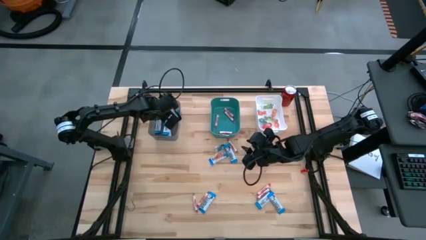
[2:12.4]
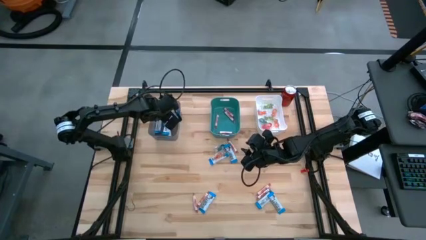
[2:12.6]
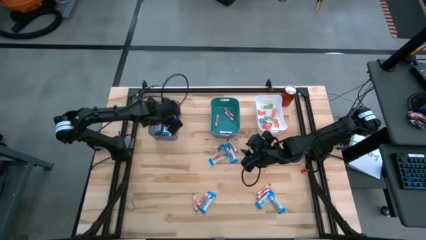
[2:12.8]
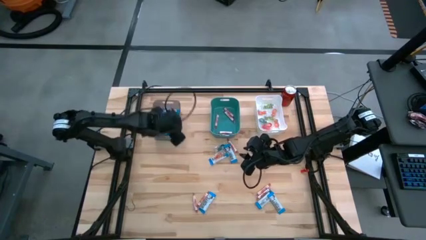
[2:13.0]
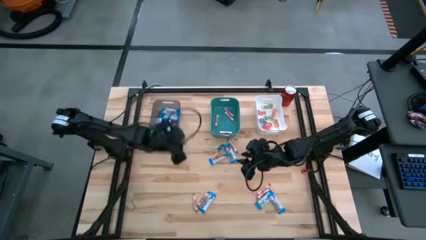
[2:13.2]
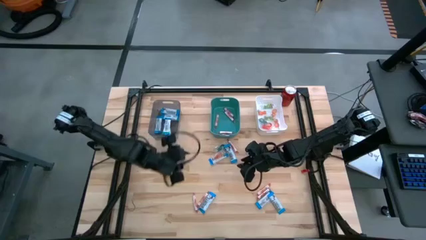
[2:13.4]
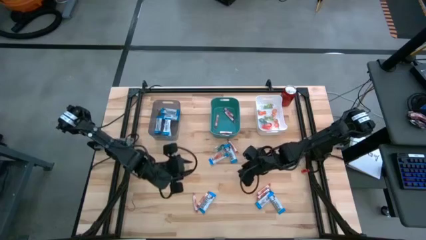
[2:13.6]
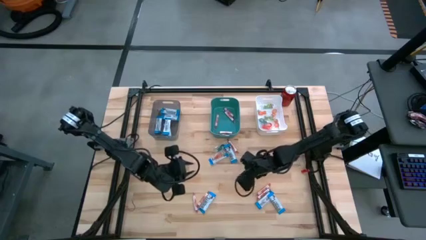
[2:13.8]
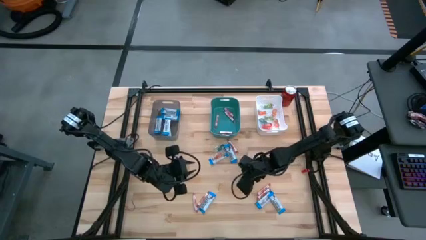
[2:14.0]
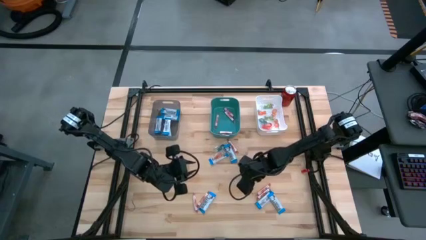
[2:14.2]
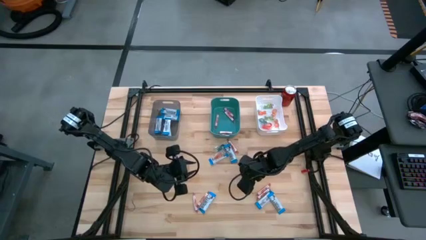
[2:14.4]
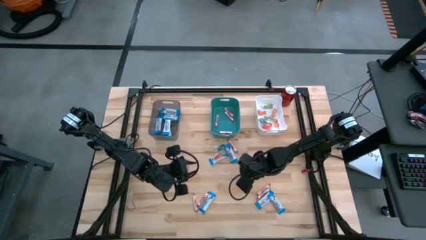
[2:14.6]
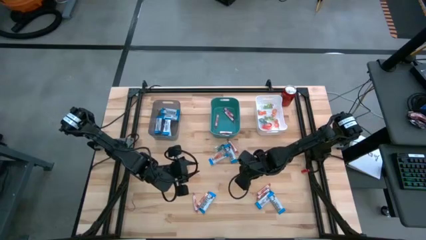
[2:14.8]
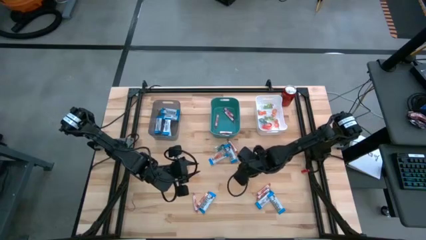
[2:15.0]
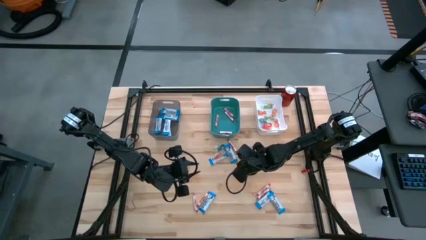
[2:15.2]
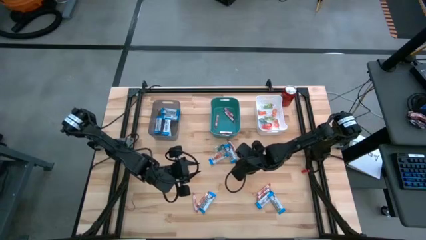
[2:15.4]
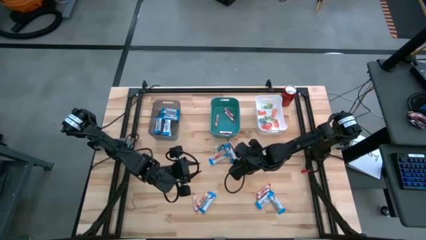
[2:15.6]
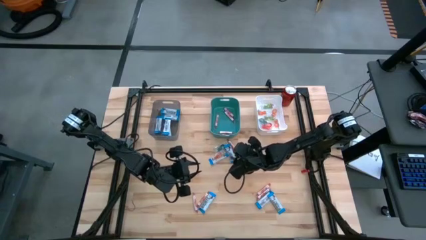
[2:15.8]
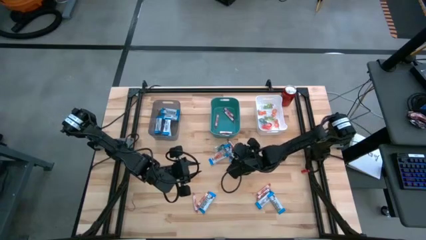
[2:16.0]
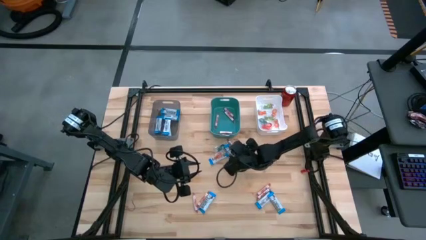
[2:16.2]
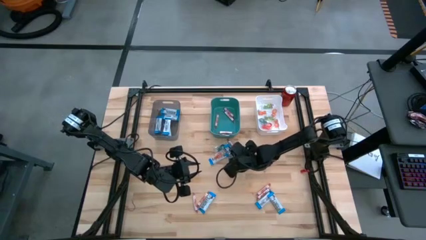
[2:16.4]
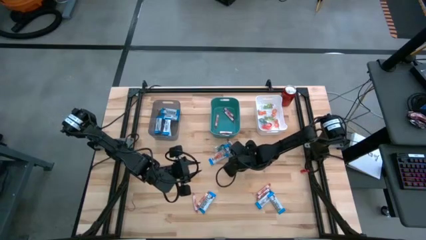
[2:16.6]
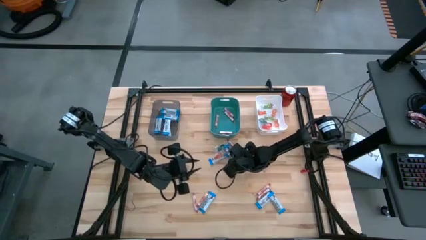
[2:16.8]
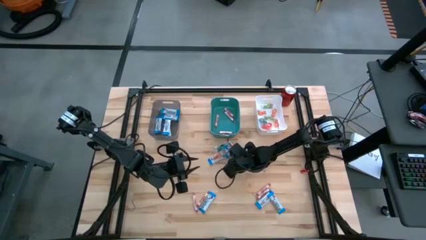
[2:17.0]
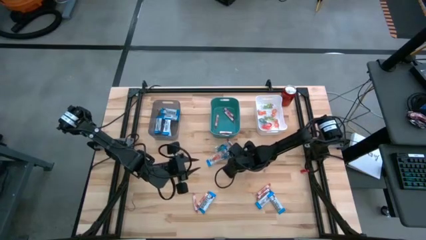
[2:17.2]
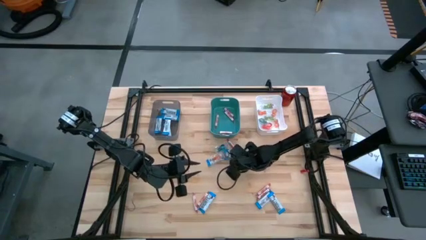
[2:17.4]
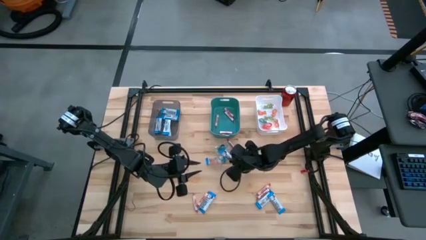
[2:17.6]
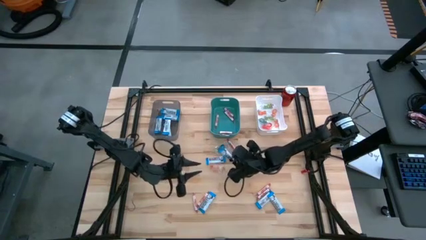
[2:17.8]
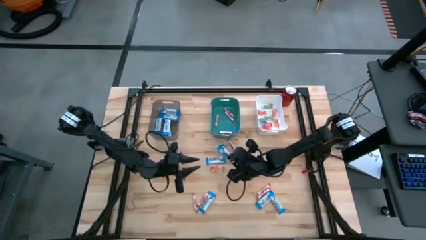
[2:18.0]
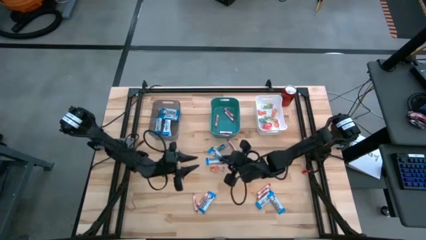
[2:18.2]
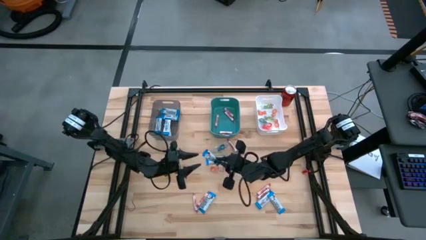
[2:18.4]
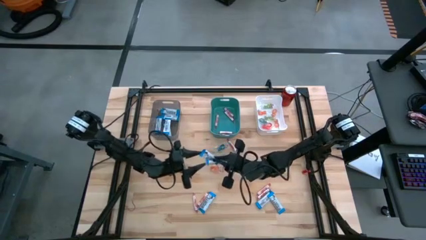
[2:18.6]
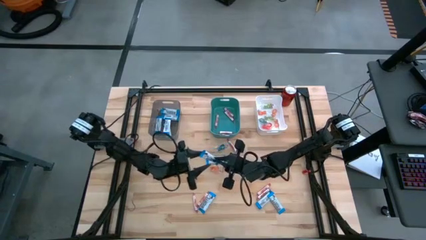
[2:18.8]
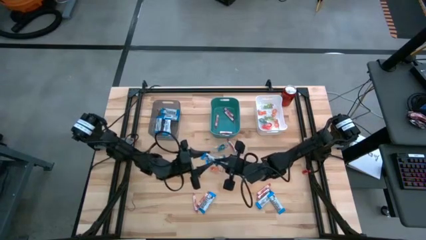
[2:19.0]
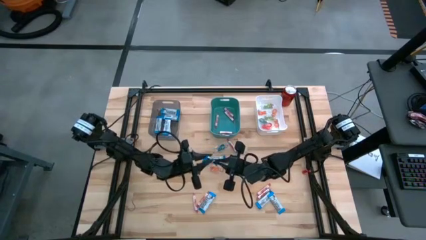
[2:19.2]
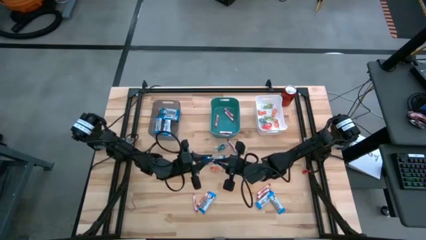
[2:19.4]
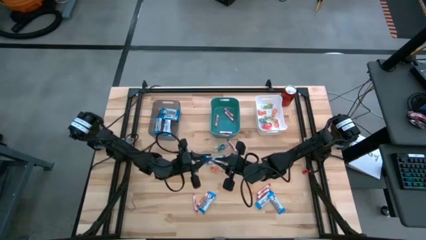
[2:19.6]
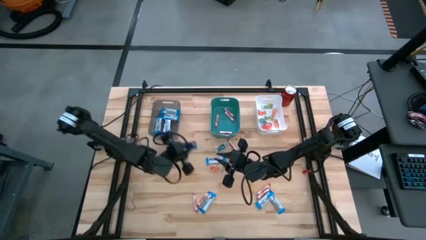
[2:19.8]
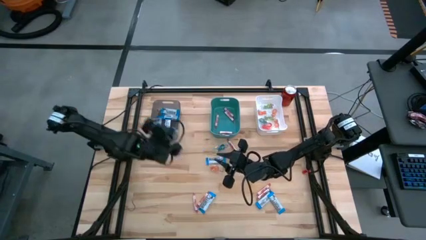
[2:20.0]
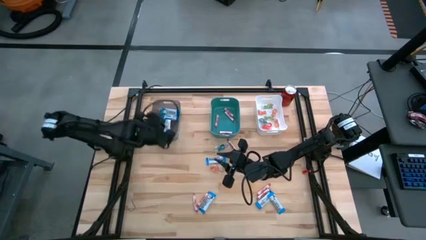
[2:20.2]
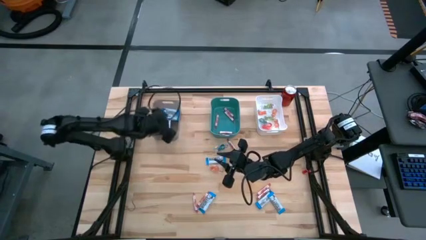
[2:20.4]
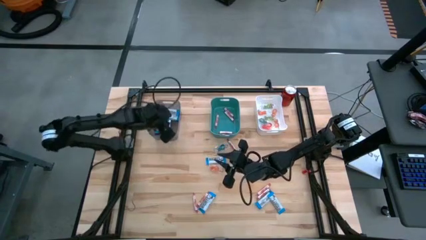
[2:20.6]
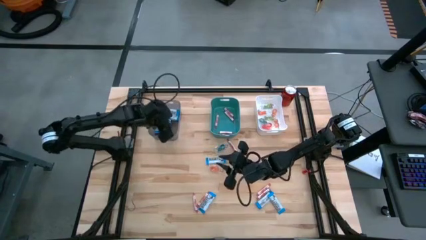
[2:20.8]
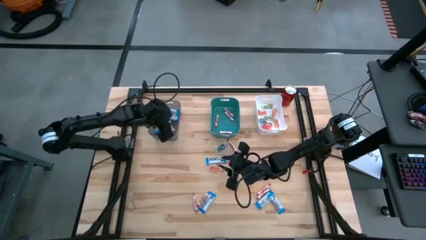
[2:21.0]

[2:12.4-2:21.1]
Task: Sort candy
Put the white chocolate into the black bin

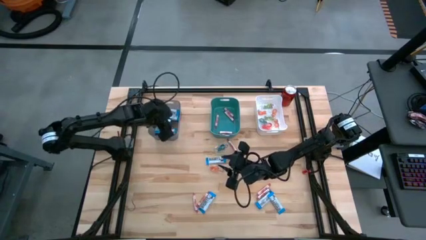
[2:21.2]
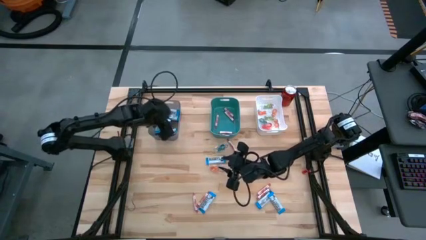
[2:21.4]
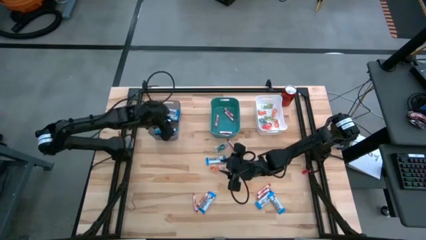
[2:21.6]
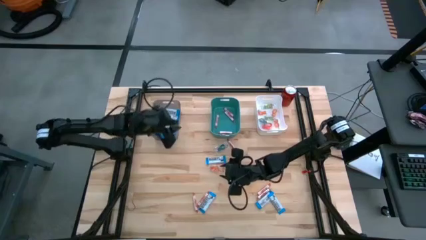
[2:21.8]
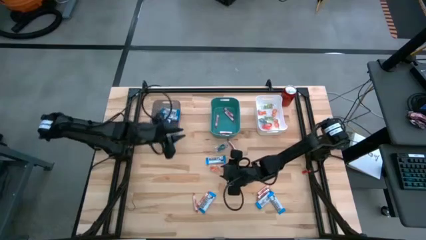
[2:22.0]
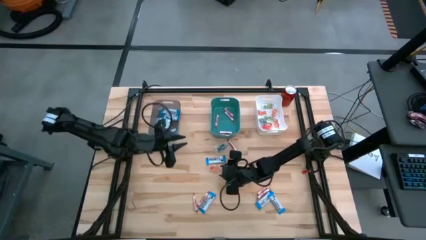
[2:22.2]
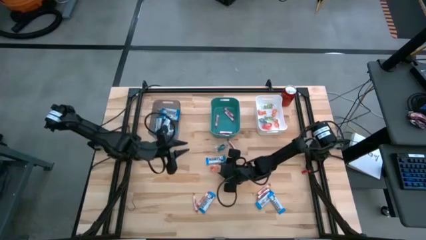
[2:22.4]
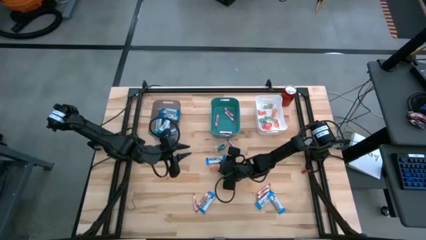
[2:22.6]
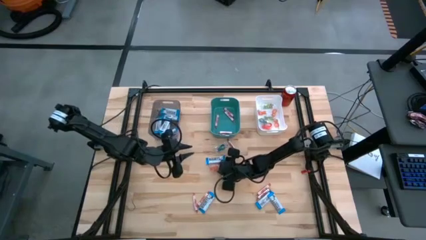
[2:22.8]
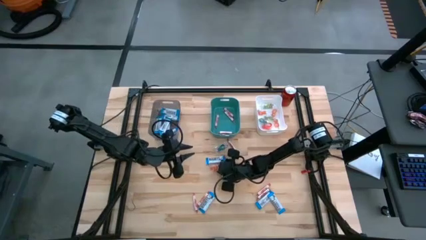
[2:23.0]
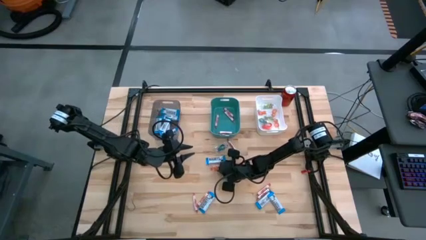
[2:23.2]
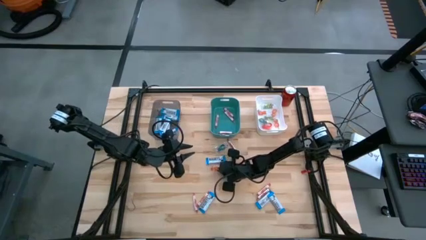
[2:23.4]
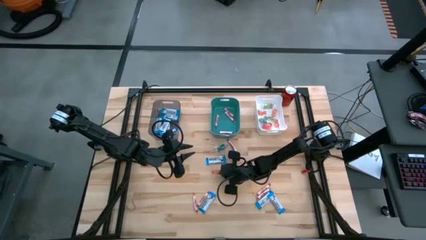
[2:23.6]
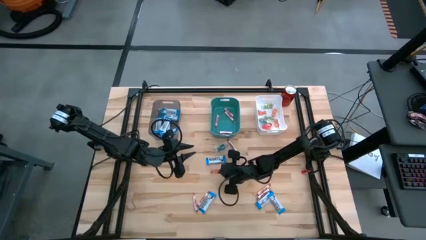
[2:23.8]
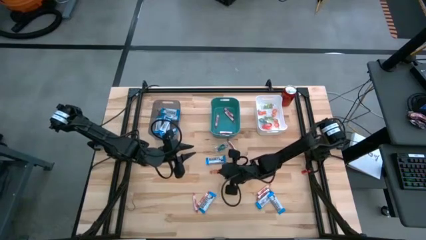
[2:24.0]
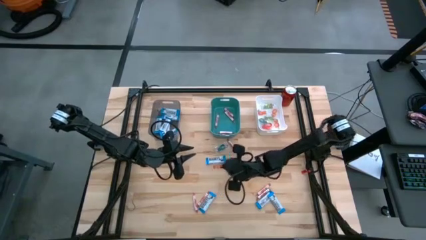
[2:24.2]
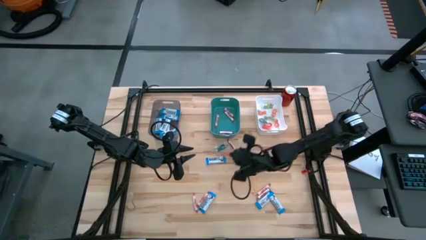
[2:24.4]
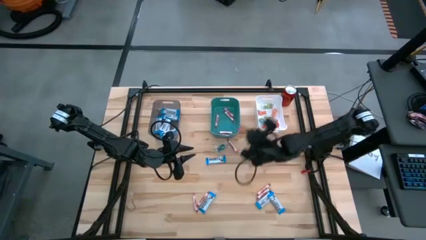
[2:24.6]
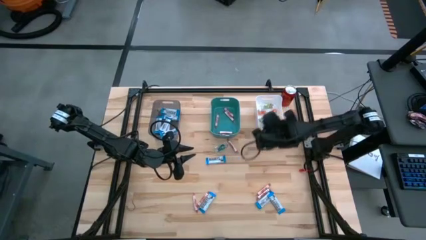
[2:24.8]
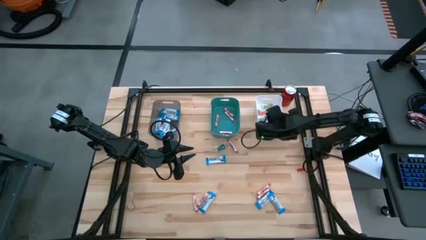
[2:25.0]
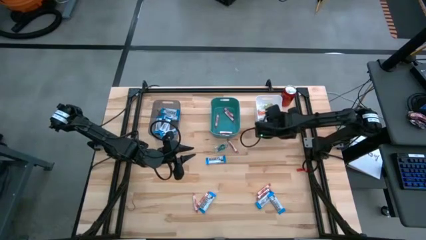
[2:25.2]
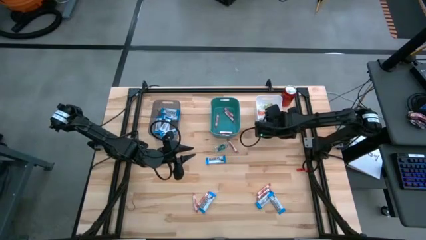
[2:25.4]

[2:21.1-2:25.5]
Put the orange gummy into the white bin

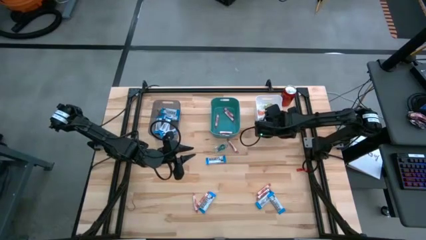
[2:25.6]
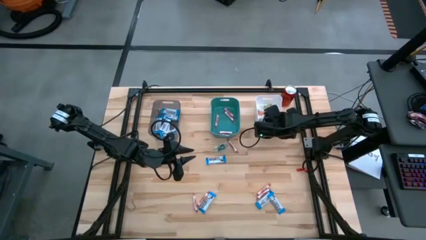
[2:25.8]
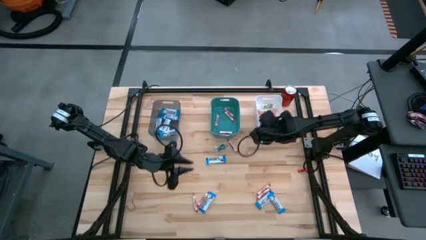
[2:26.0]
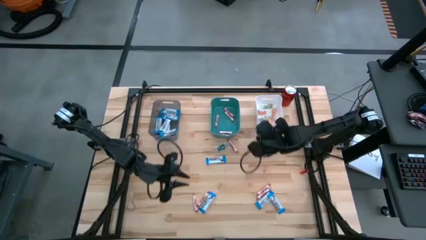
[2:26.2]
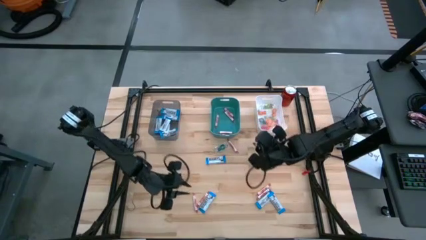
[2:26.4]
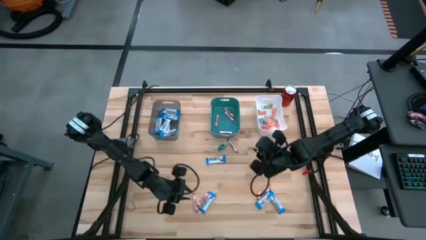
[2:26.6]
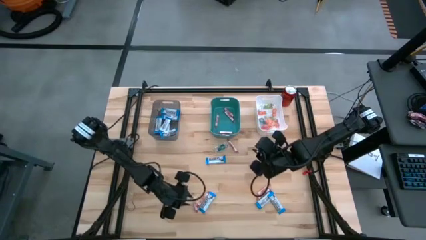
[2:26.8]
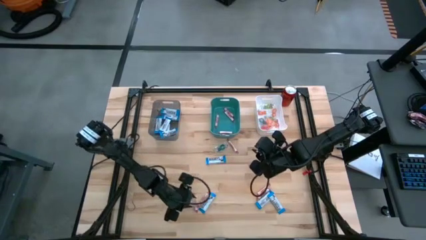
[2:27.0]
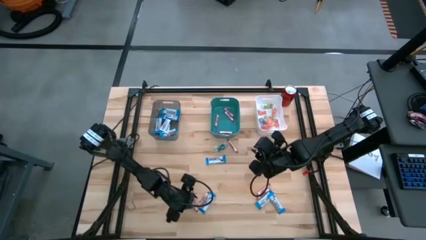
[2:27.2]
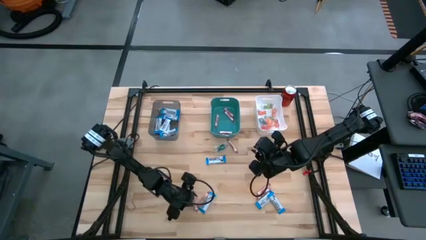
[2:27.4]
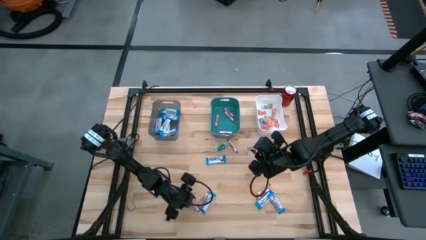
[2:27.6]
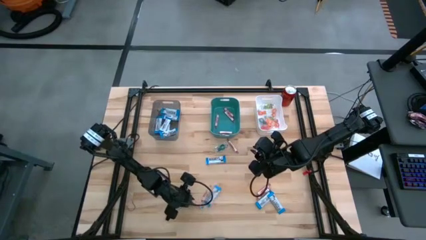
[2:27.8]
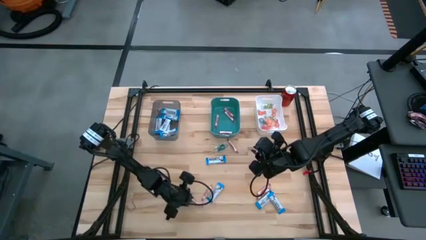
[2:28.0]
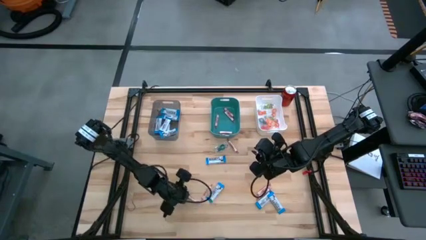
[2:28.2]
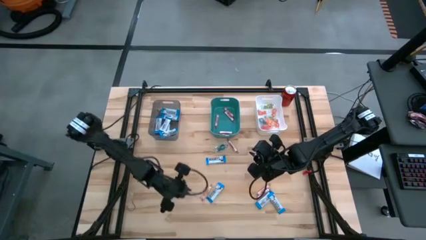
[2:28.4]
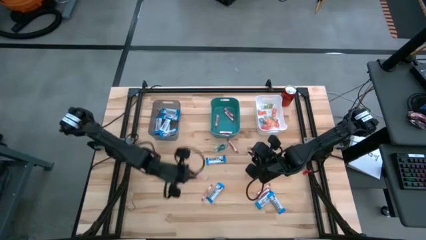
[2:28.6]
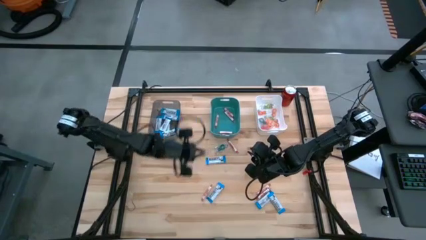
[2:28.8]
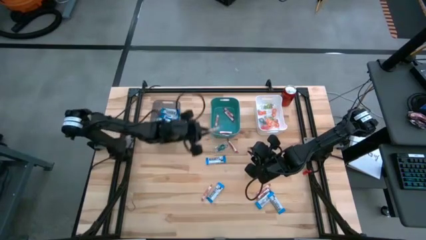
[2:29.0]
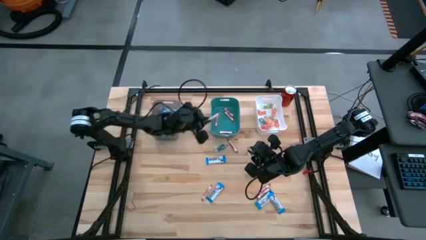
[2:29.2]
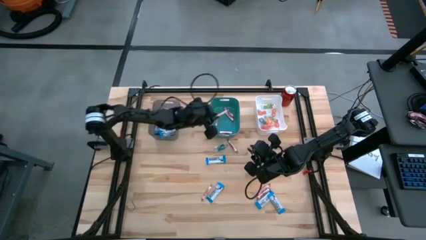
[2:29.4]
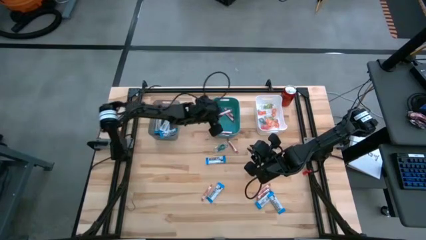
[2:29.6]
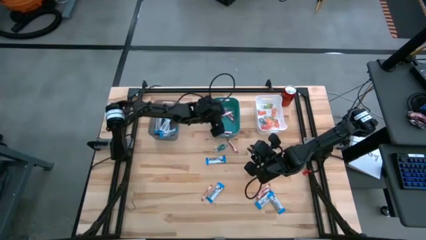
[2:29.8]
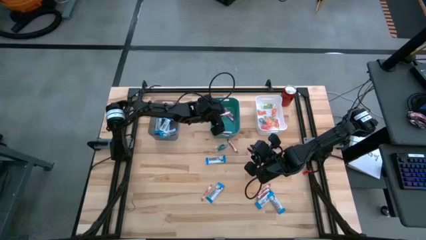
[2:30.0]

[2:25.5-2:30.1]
Put the red candy into the blue bin
